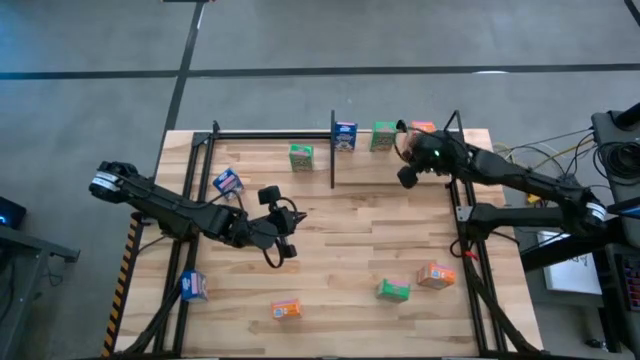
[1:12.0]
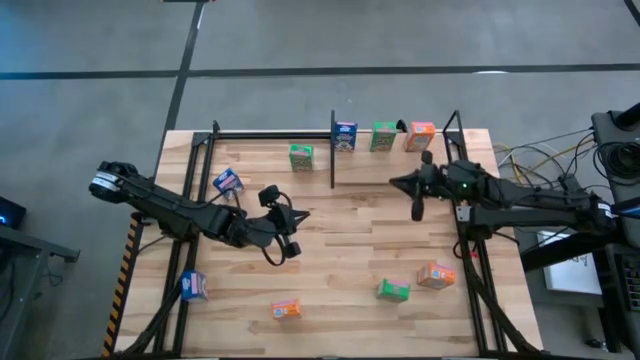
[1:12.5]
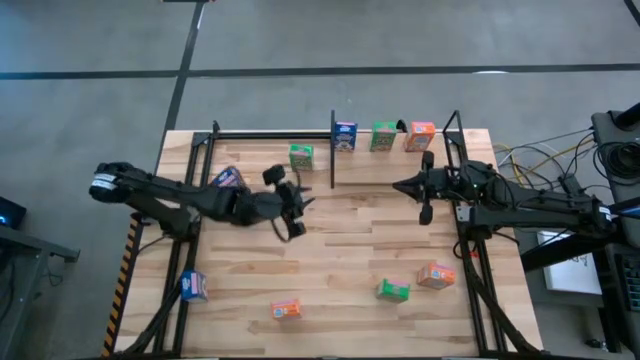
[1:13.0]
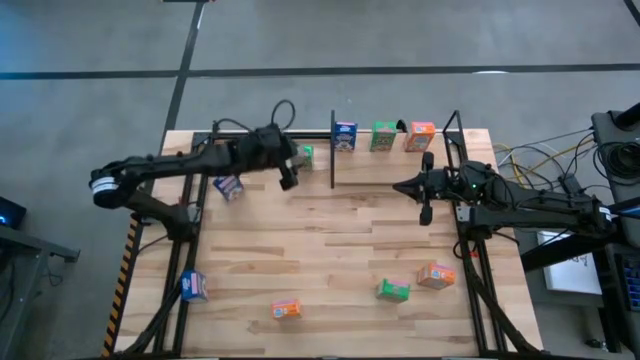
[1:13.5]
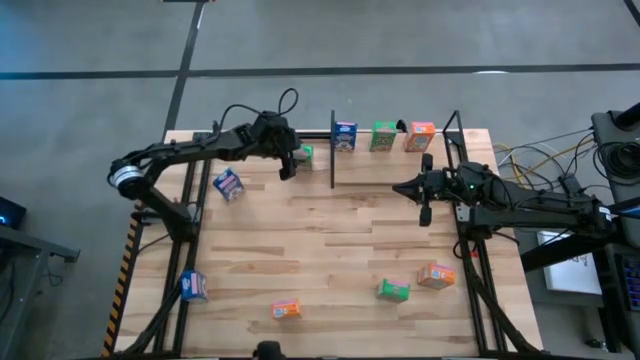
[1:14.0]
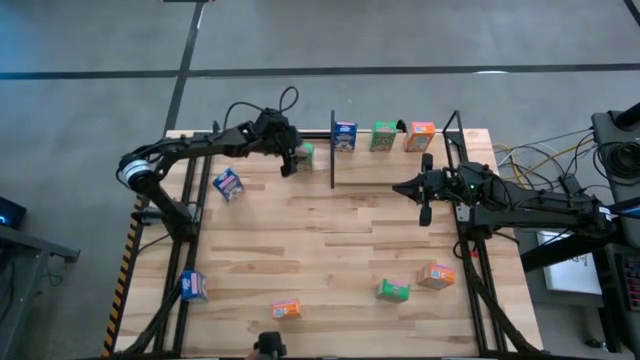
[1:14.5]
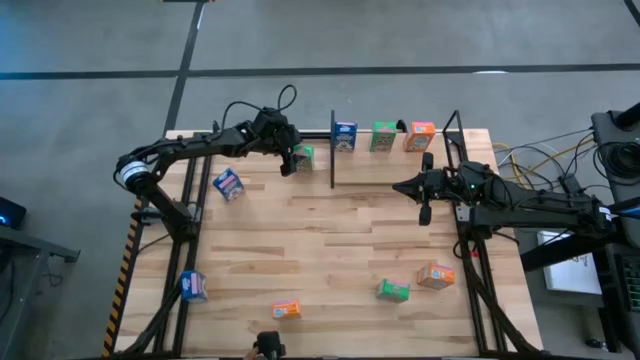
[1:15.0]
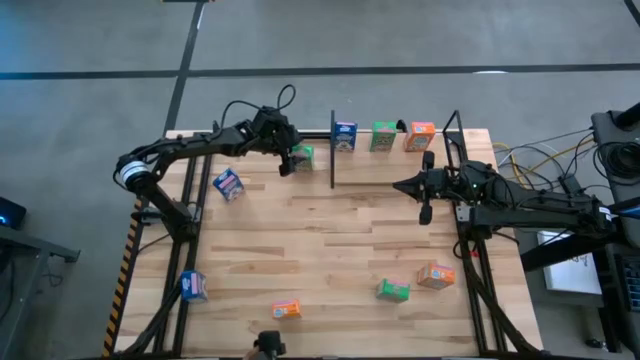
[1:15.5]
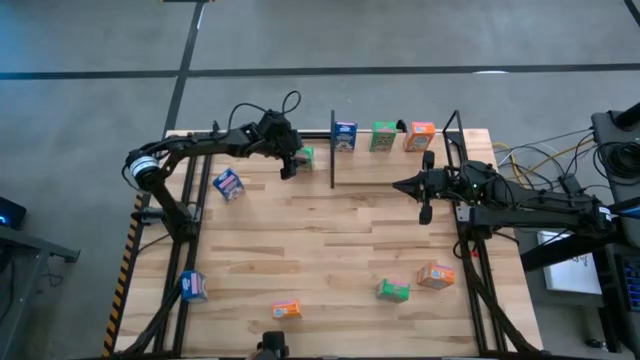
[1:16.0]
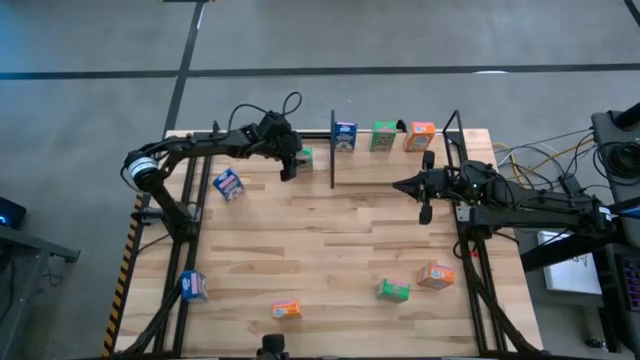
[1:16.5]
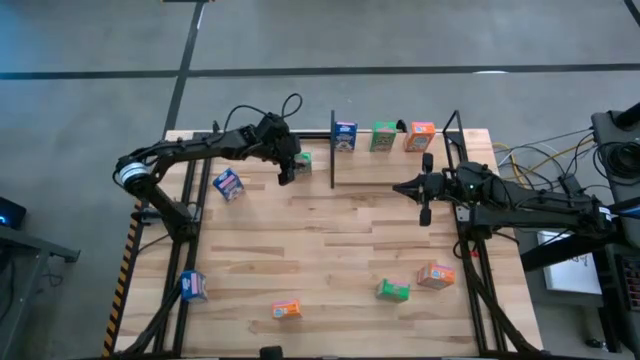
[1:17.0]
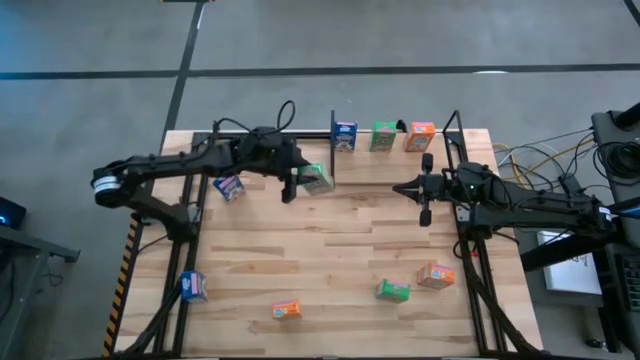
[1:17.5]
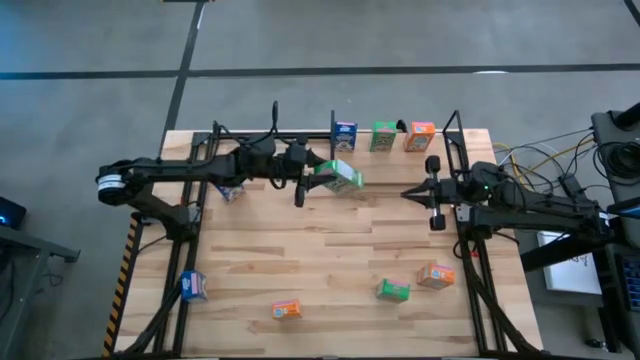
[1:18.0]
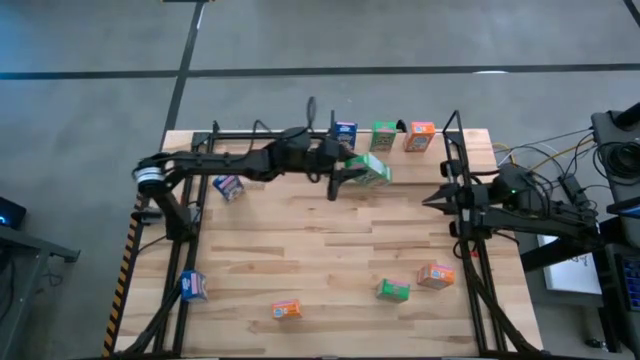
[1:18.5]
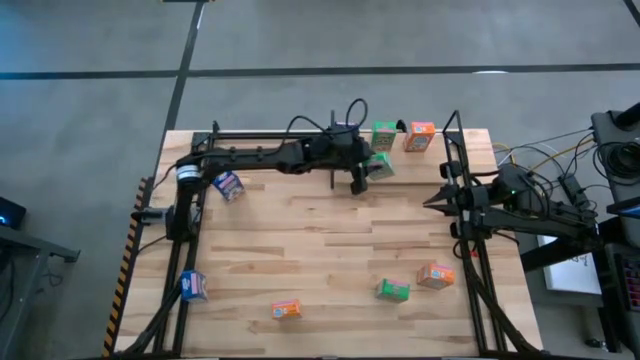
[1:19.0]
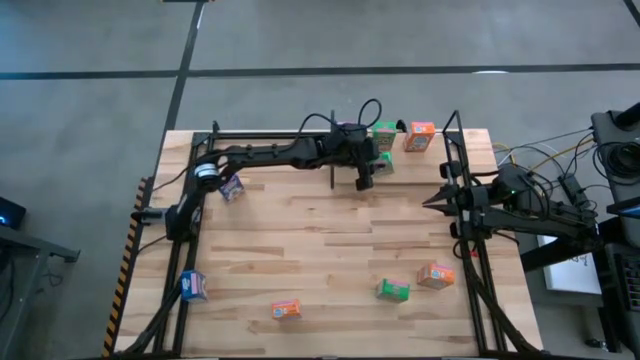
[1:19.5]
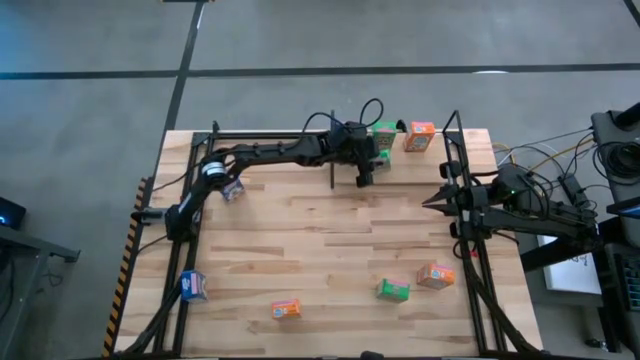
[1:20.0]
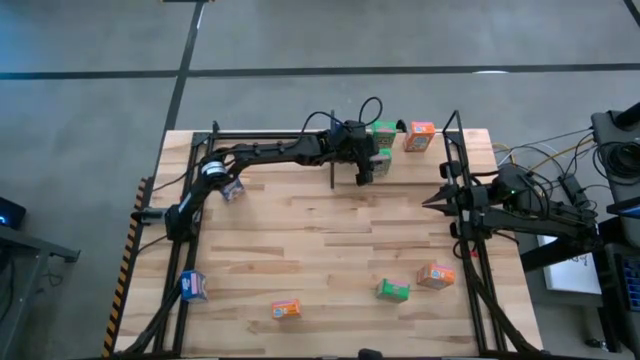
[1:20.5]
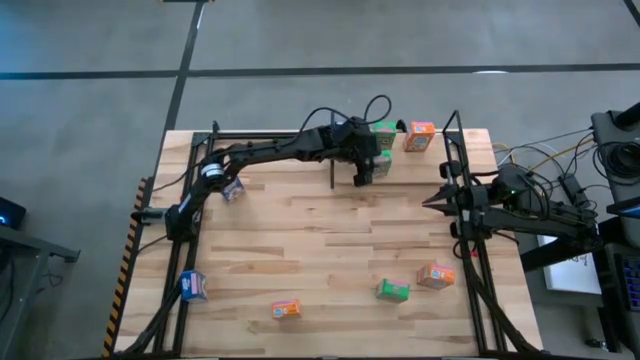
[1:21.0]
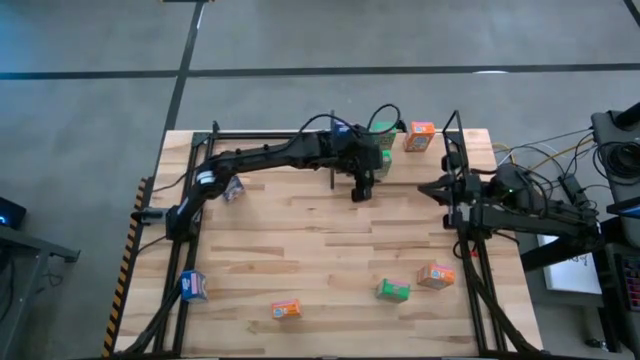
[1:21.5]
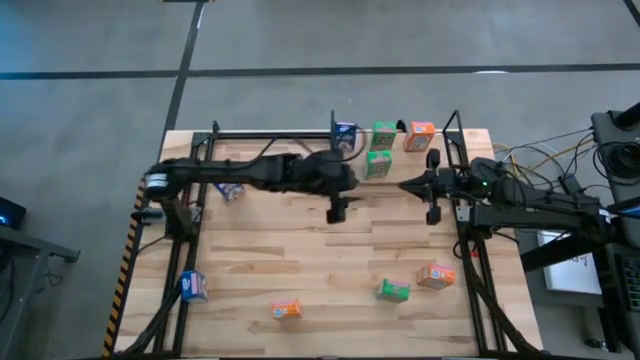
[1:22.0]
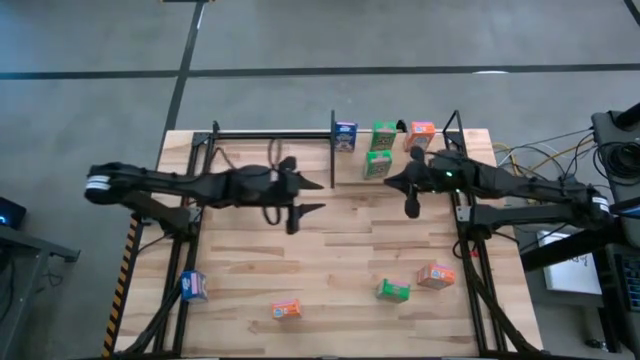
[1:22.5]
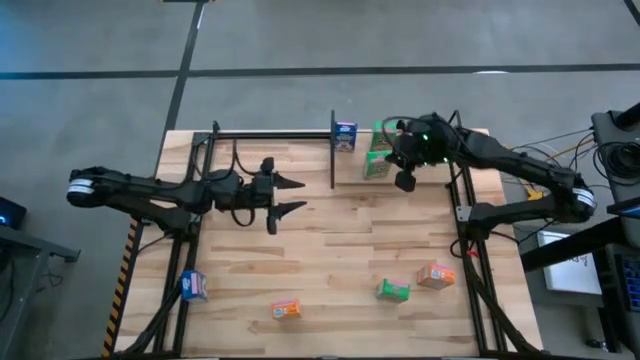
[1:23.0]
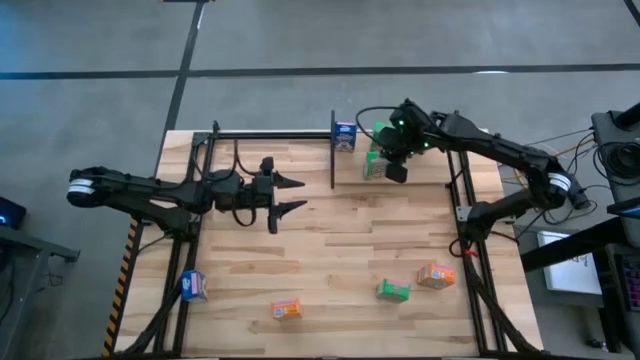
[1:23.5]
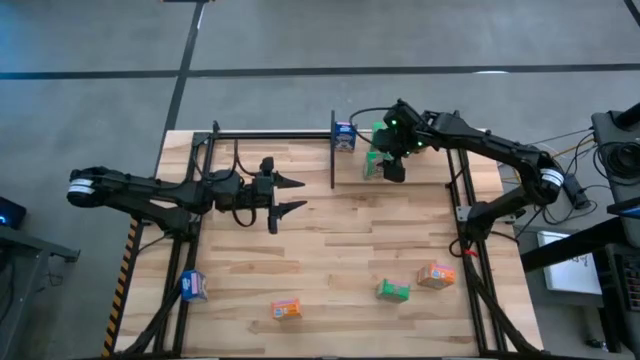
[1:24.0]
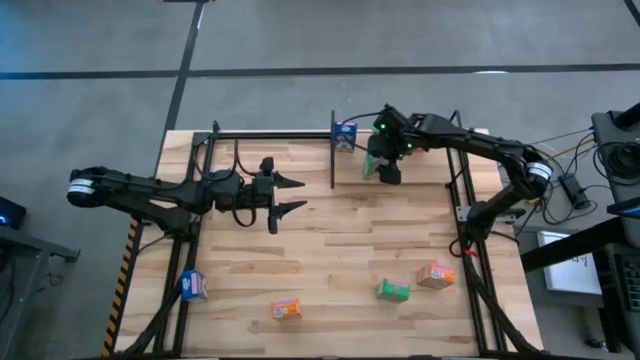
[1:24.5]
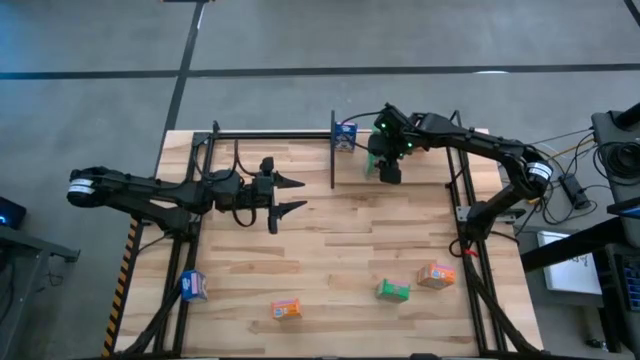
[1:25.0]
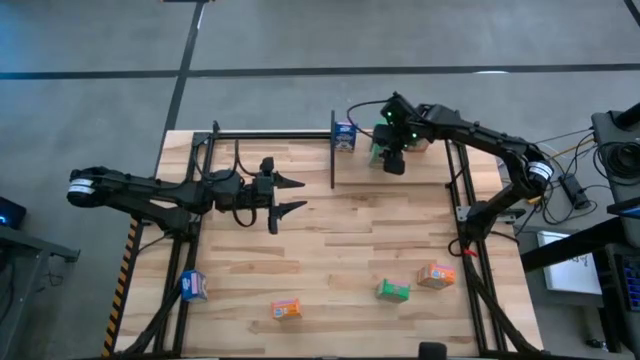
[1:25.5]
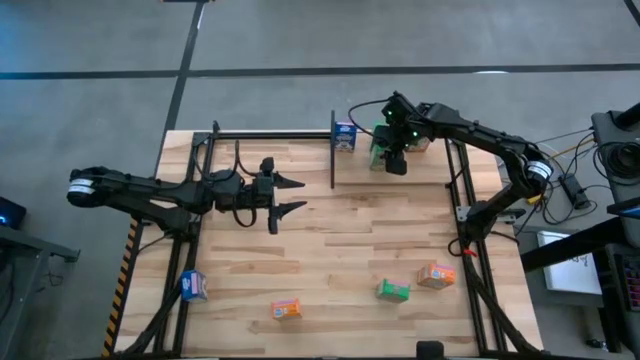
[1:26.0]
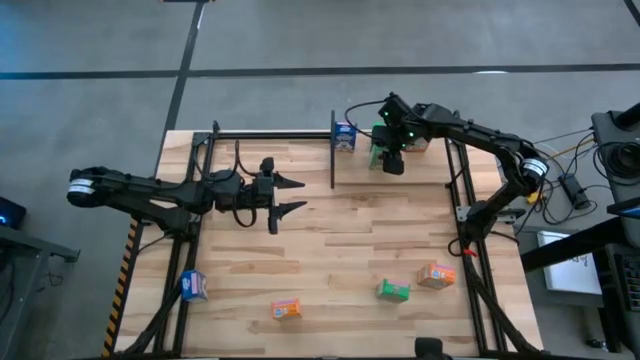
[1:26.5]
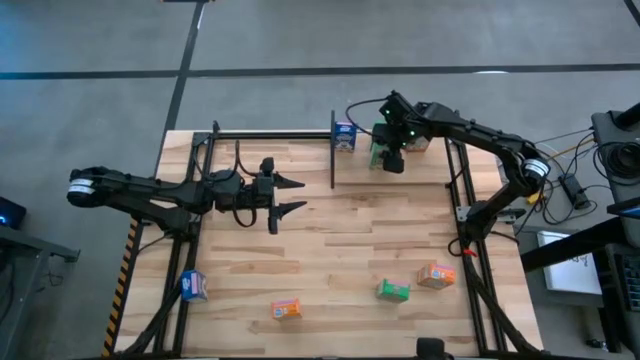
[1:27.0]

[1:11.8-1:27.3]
Task: Stack cereal on shelf
Put the top green cereal box on the shelf aligned with the other green cereal box on the shelf
